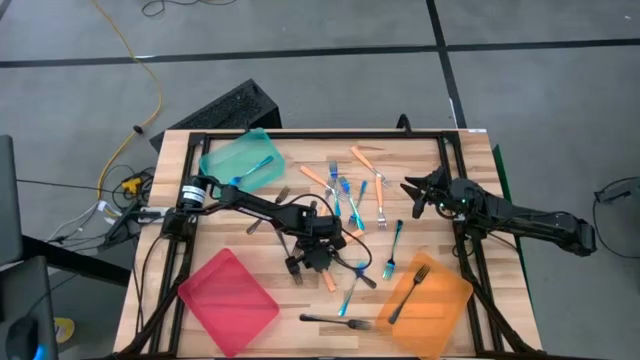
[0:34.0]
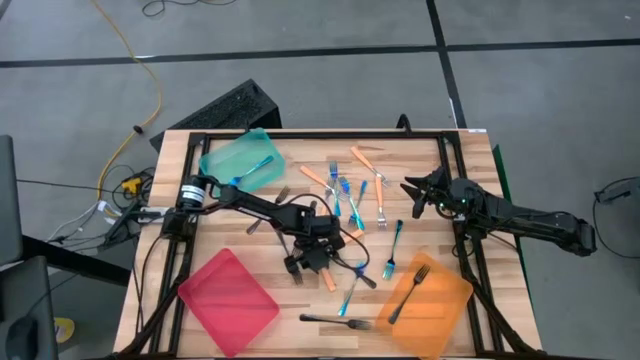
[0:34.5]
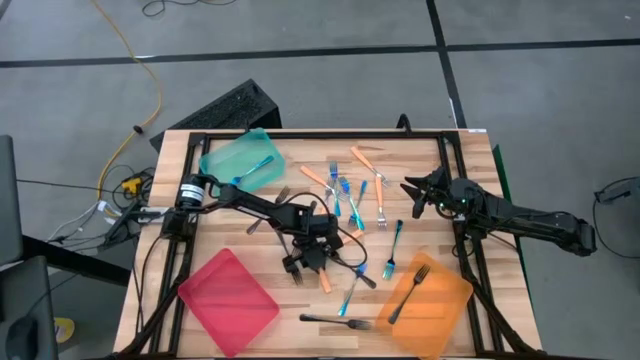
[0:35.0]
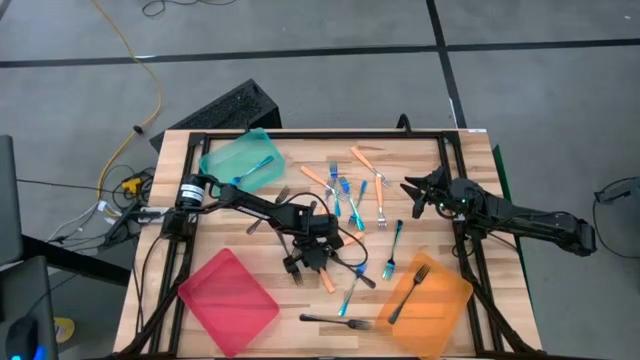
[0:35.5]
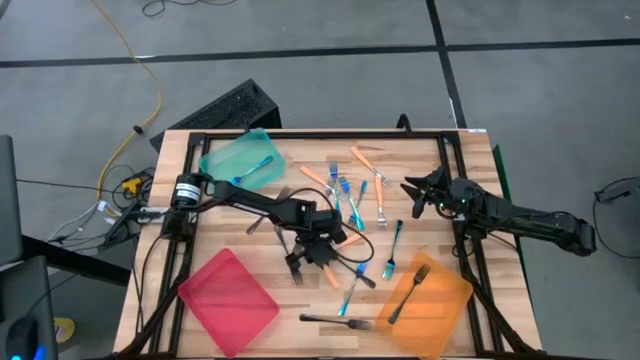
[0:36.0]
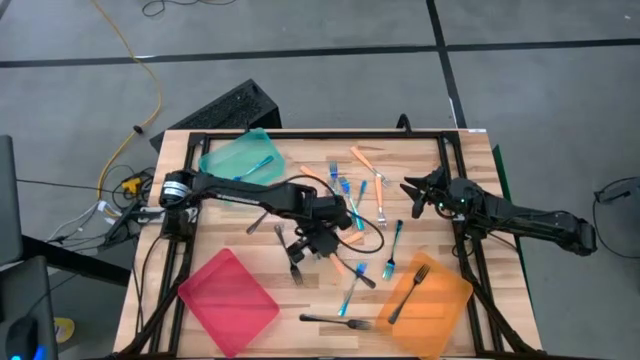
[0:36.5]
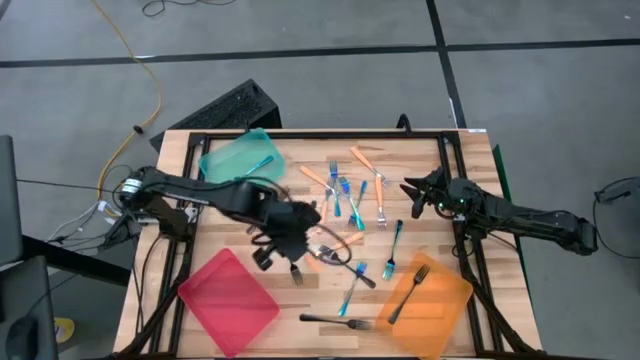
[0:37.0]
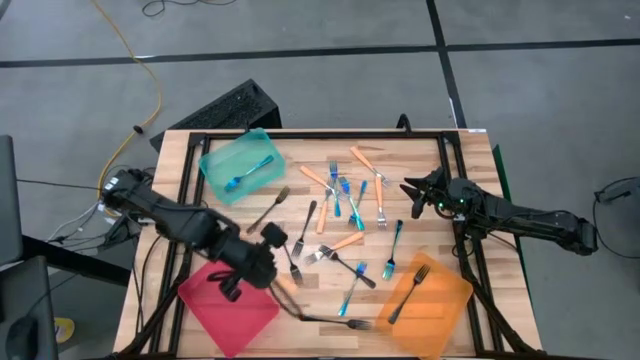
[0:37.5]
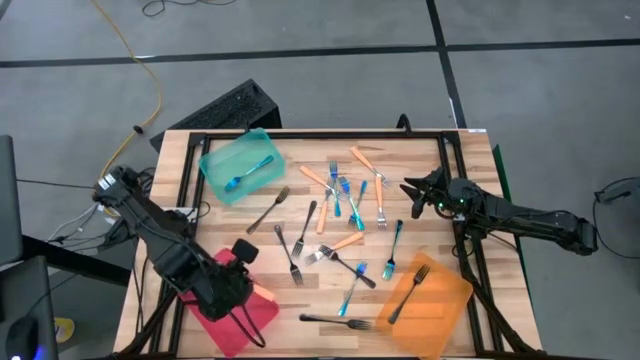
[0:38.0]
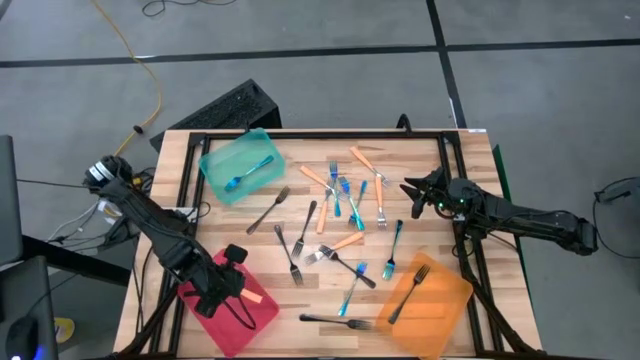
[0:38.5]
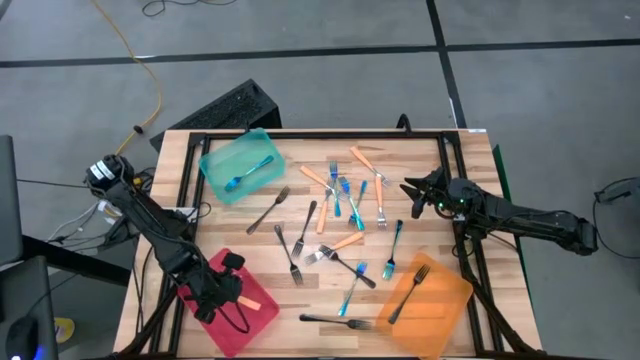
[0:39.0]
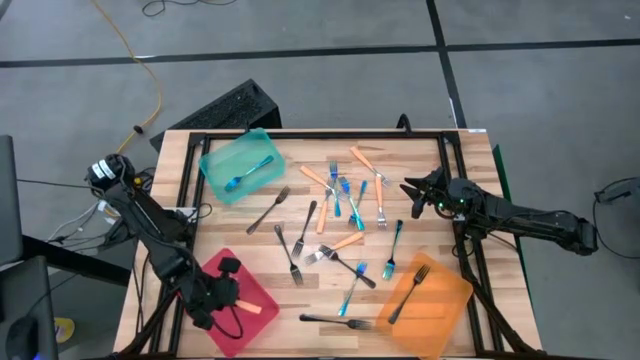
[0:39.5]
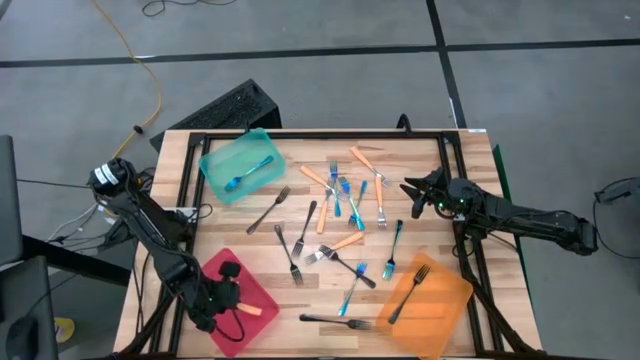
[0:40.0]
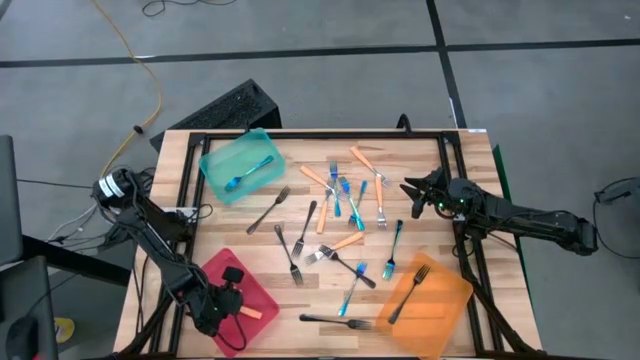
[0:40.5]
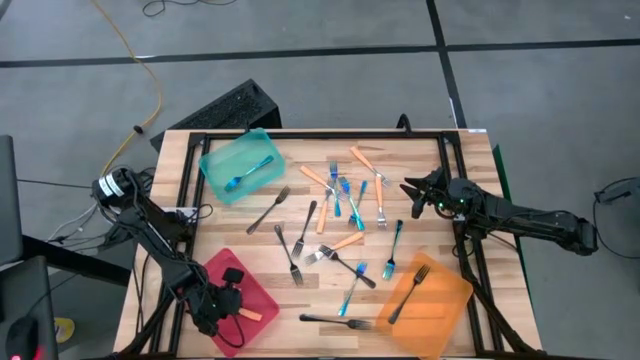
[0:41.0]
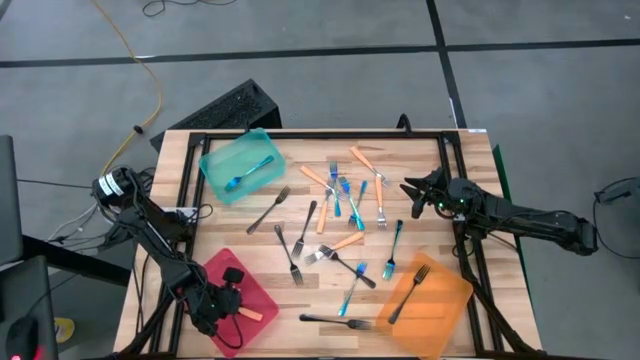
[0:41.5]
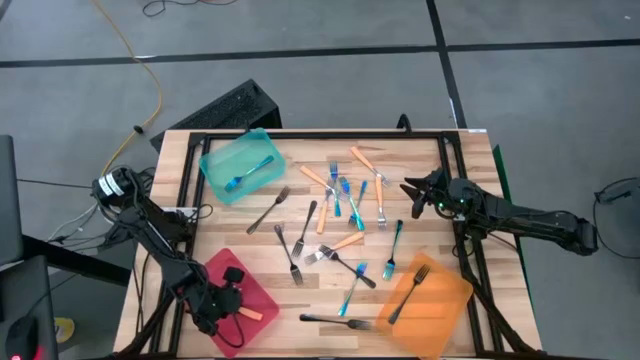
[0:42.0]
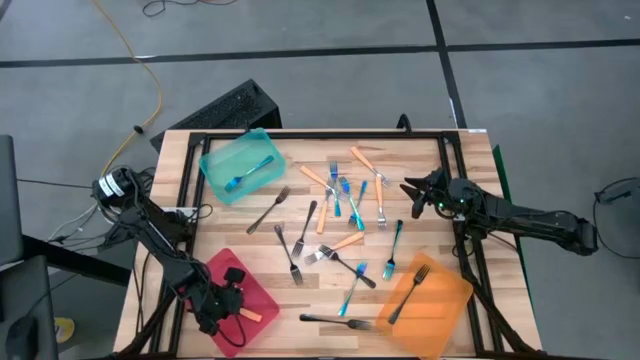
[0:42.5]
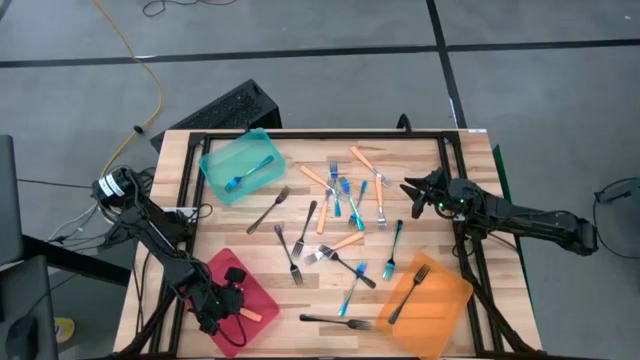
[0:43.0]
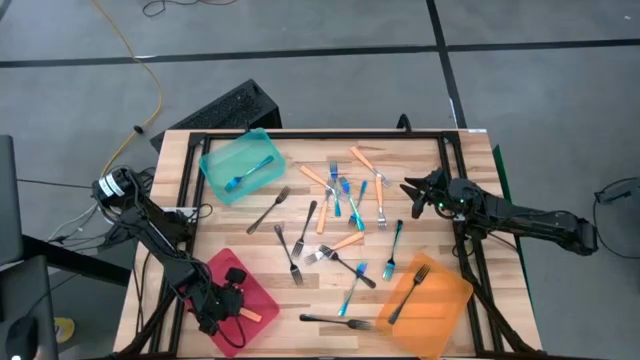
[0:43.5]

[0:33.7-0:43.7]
Task: Sort silverware by color (type)
Put the orange fork into the red bin

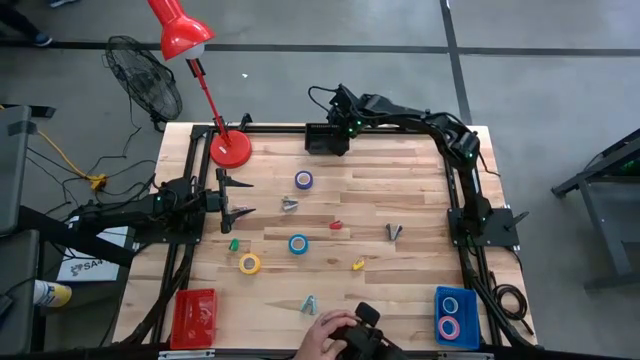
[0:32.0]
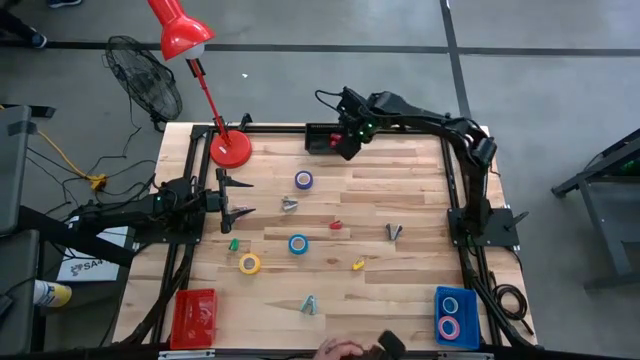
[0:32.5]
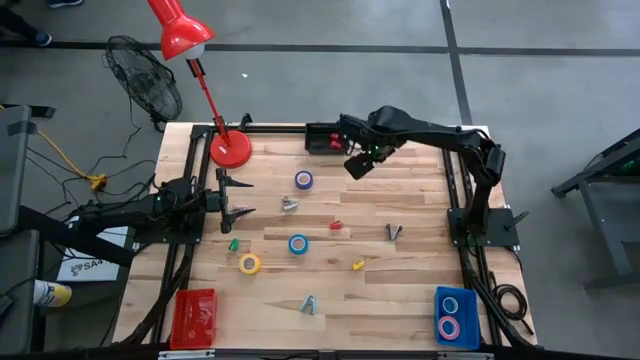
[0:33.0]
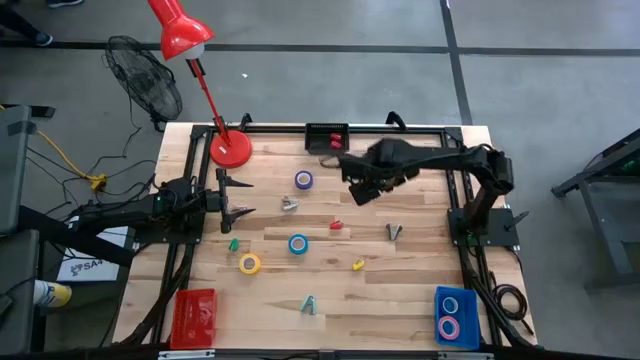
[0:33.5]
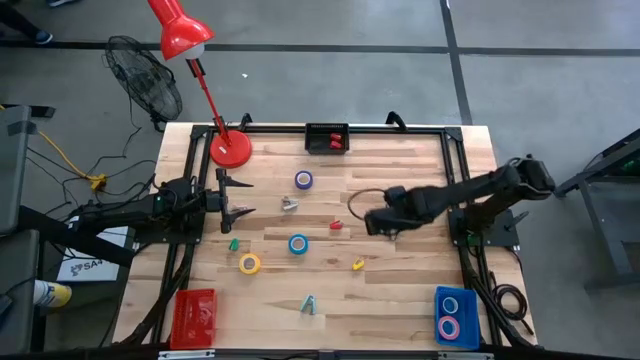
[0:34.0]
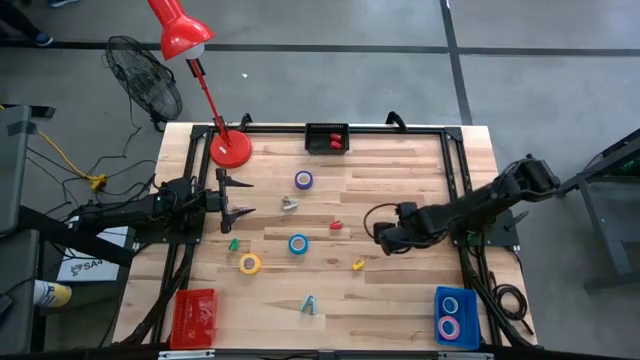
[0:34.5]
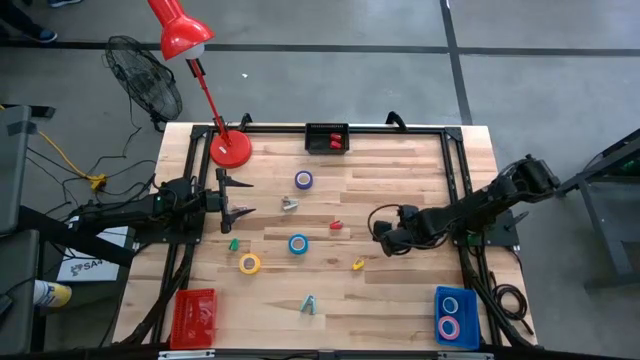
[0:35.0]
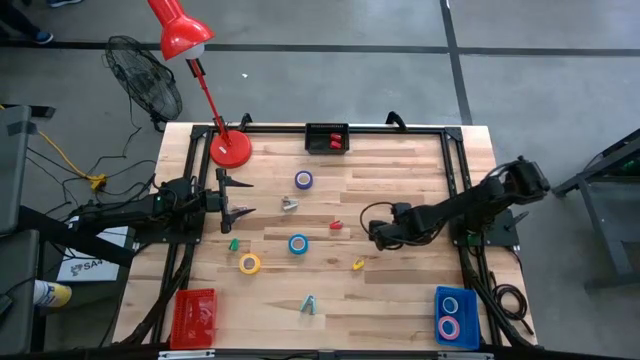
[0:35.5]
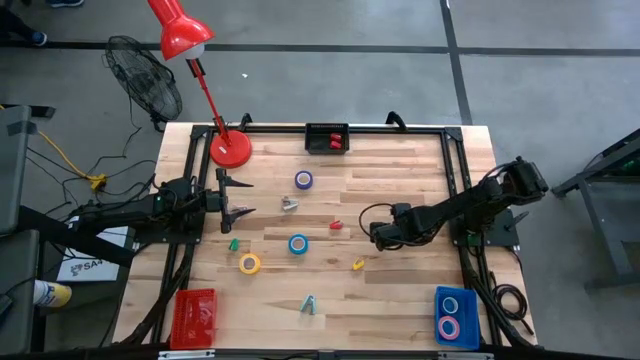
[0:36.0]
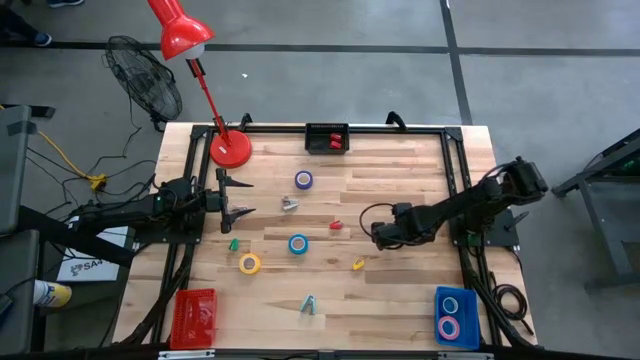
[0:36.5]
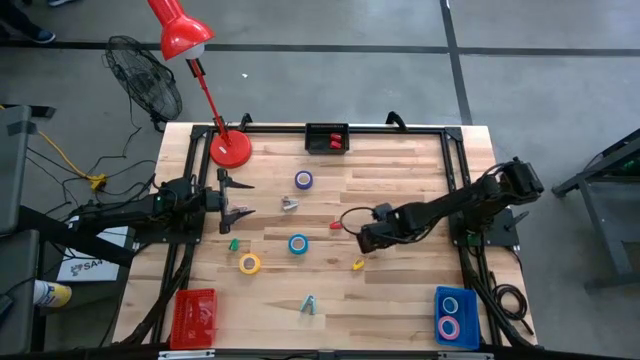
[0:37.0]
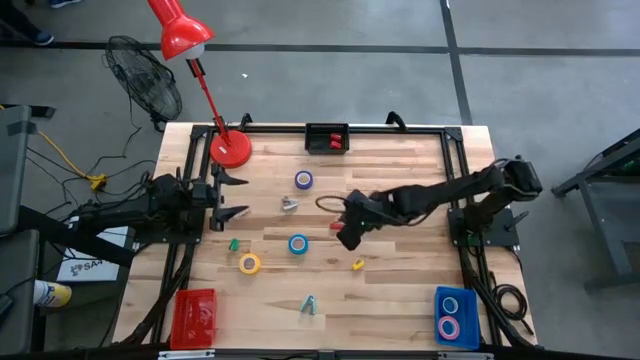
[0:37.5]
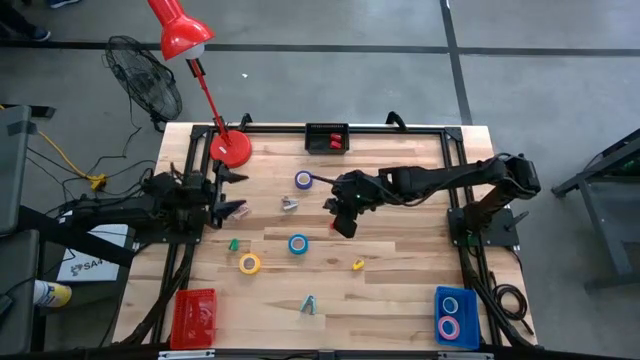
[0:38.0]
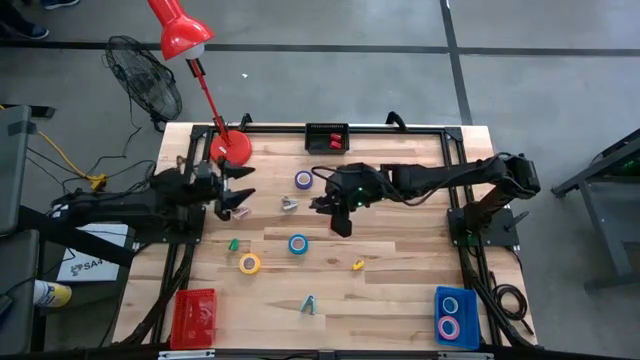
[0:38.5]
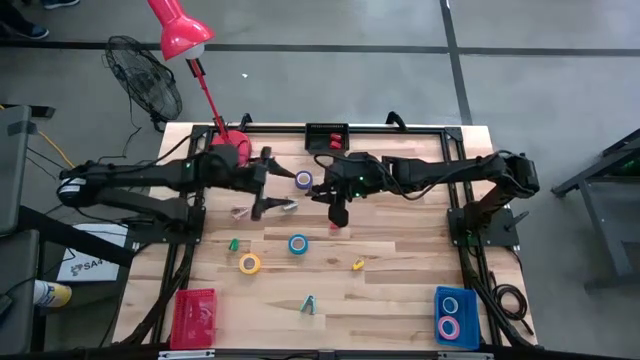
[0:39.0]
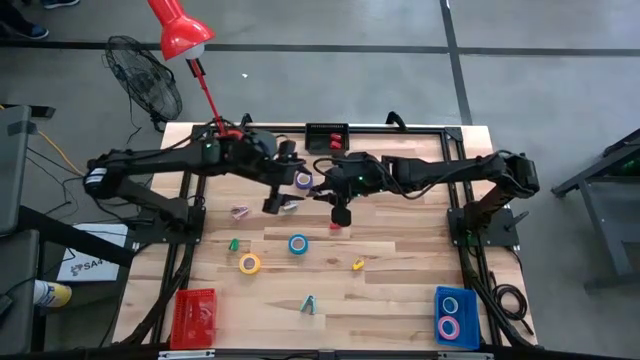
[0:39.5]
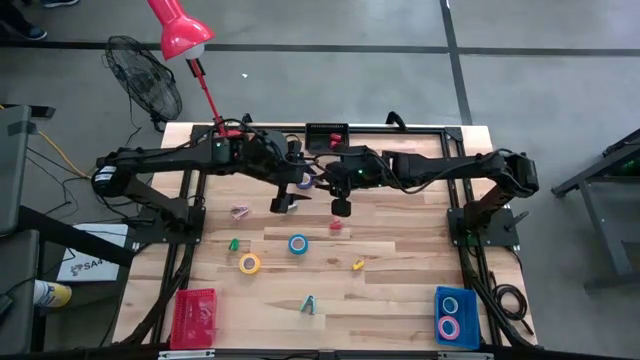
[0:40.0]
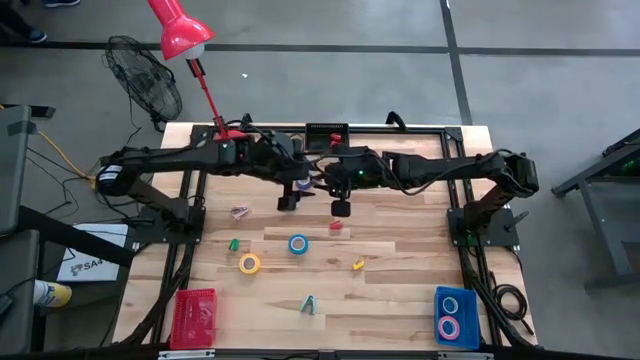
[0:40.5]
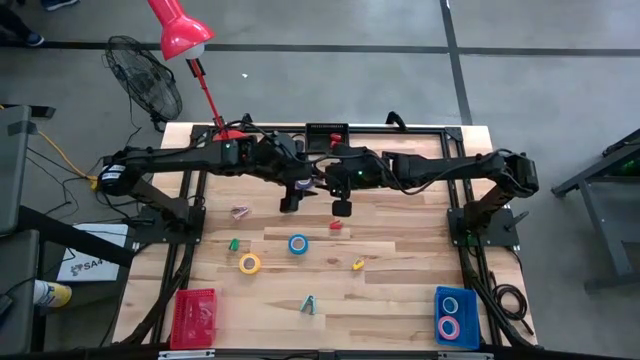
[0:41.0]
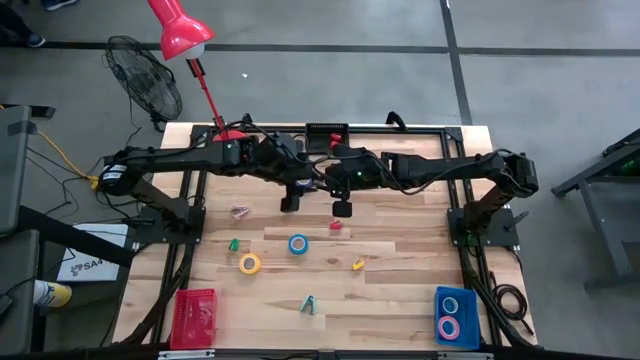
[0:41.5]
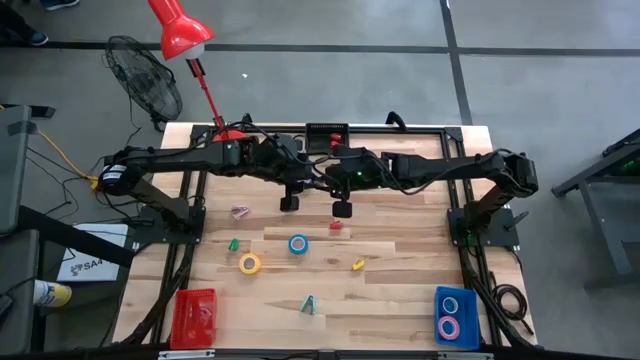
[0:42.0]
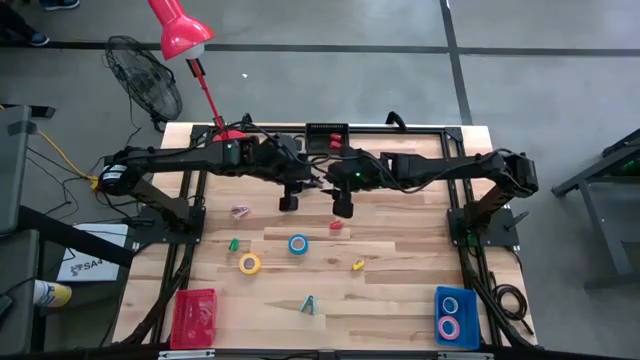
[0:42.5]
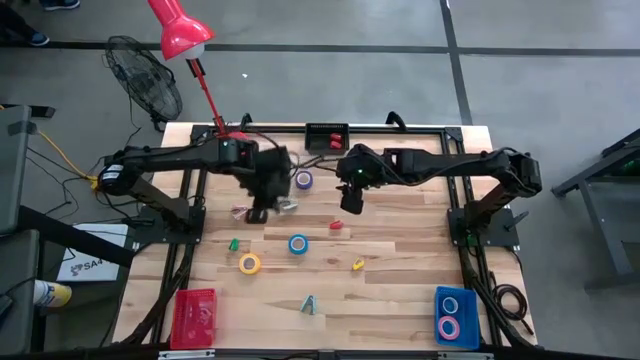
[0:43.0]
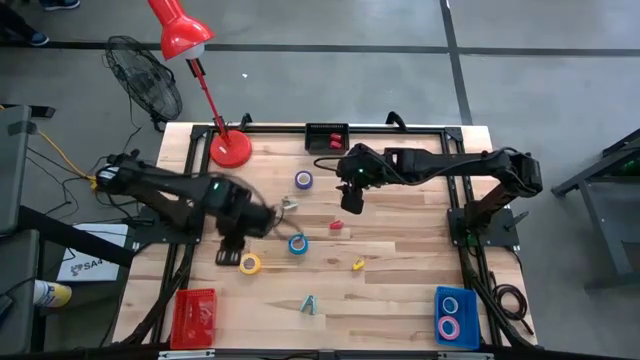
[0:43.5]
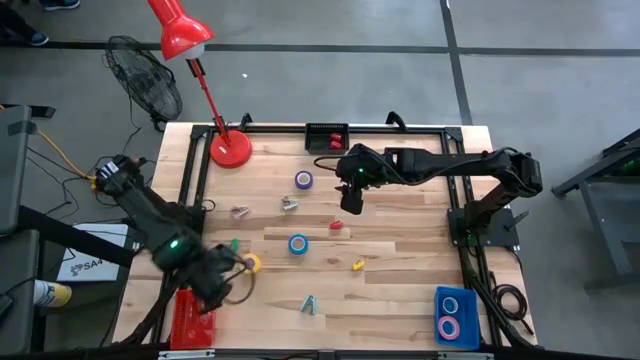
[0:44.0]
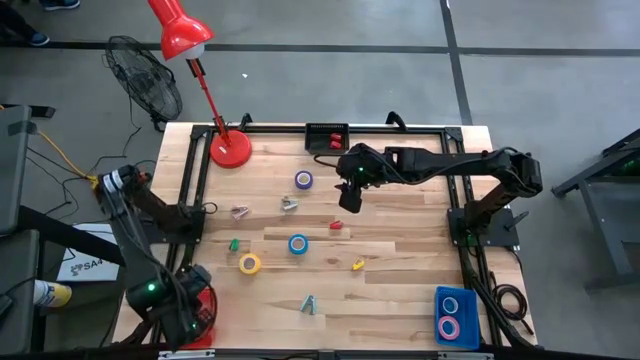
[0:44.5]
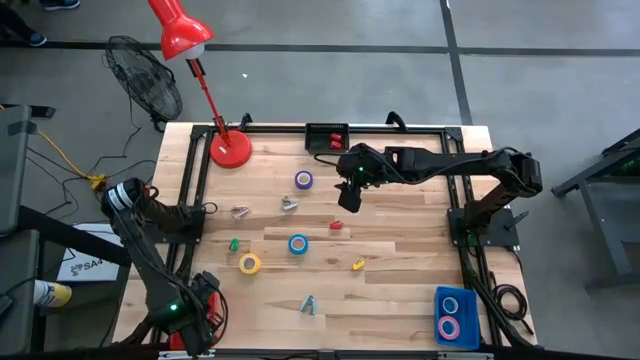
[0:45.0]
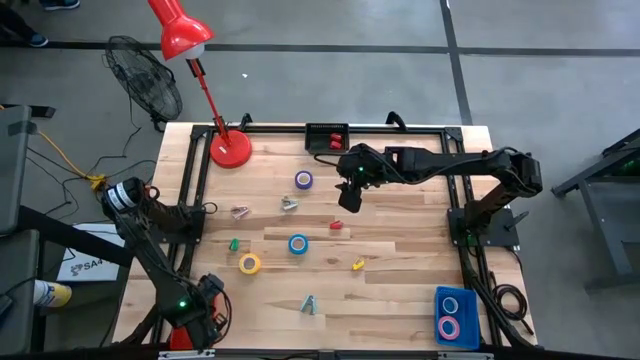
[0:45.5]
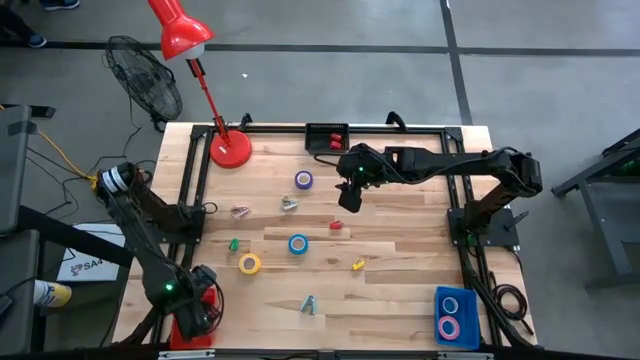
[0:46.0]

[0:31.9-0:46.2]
Task: Pick and place Stapler, Stapler remover, tape
Put the black staple remover into the red basket
